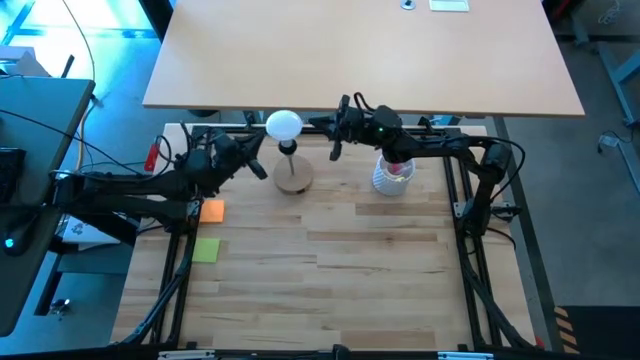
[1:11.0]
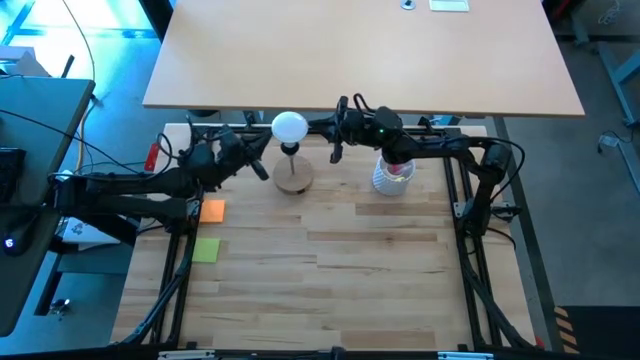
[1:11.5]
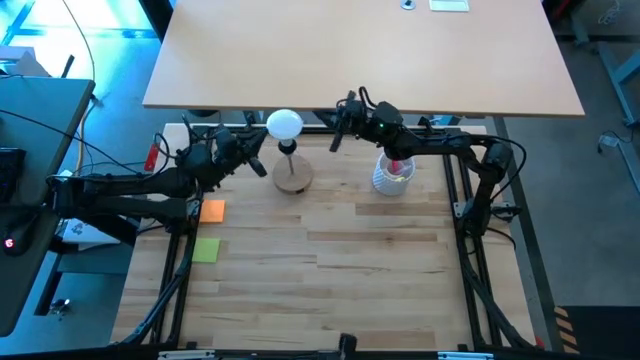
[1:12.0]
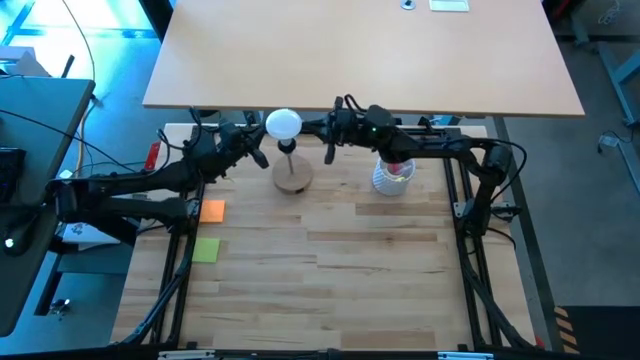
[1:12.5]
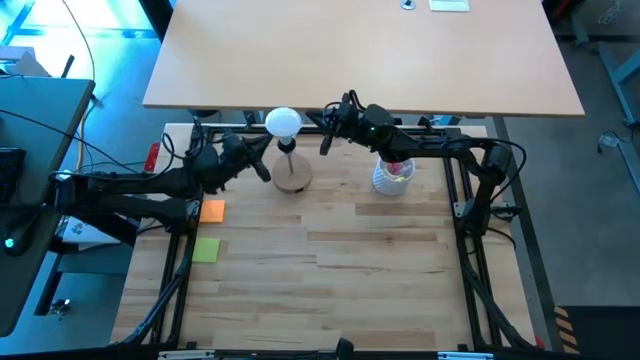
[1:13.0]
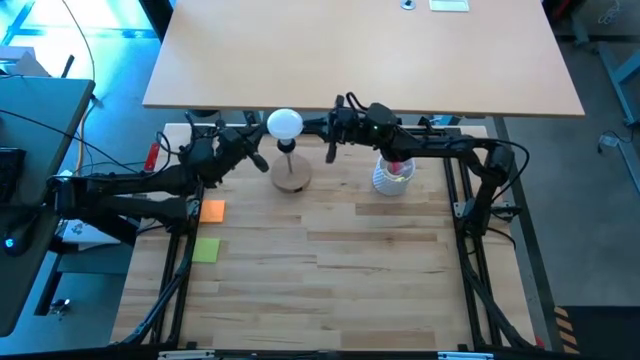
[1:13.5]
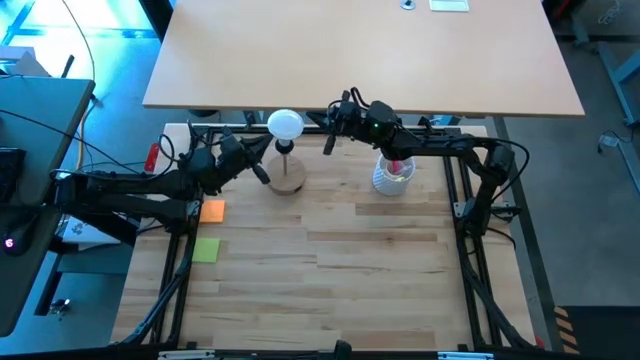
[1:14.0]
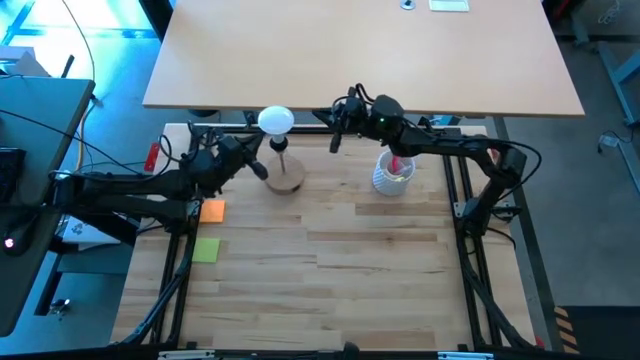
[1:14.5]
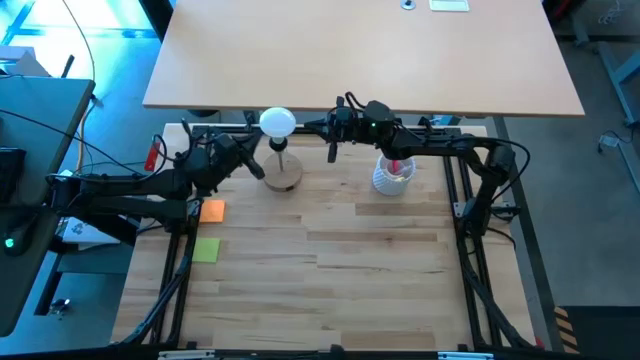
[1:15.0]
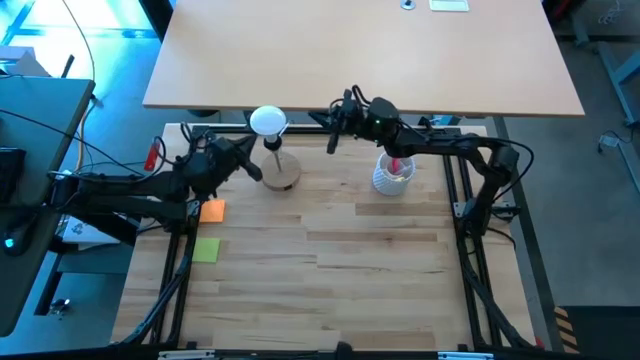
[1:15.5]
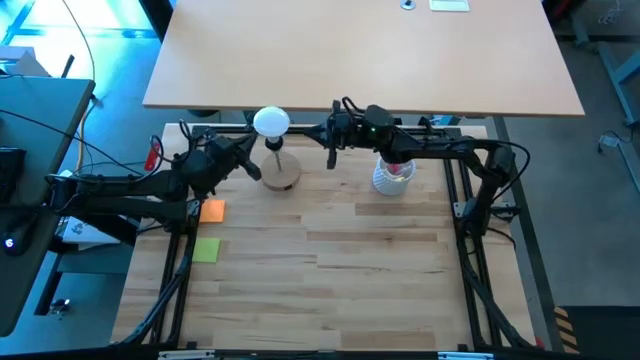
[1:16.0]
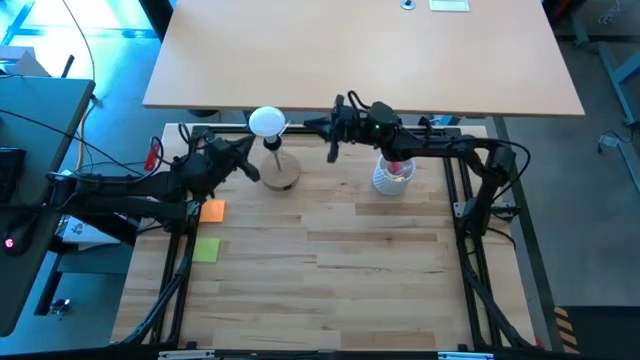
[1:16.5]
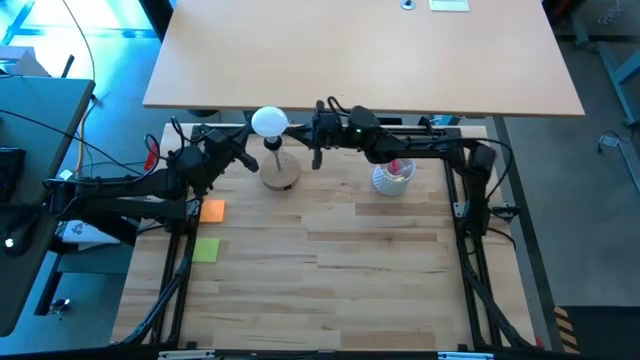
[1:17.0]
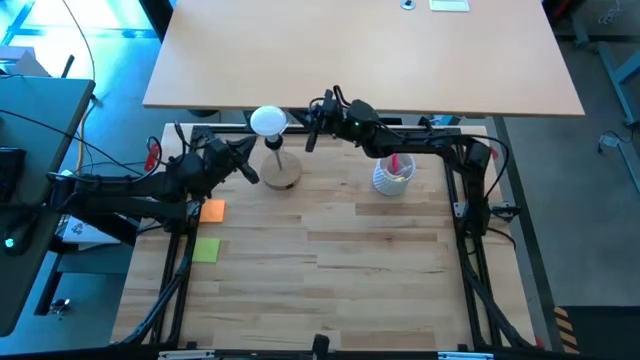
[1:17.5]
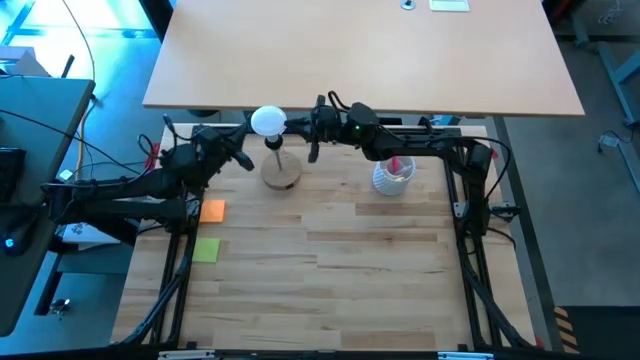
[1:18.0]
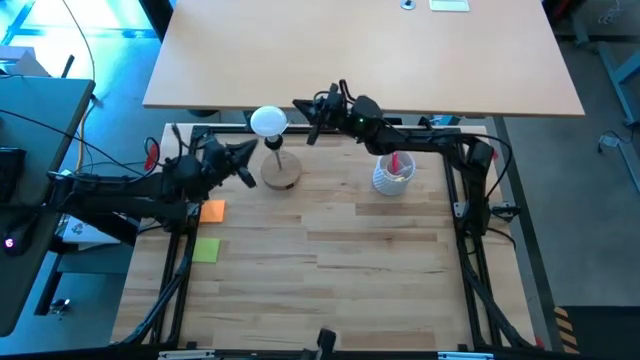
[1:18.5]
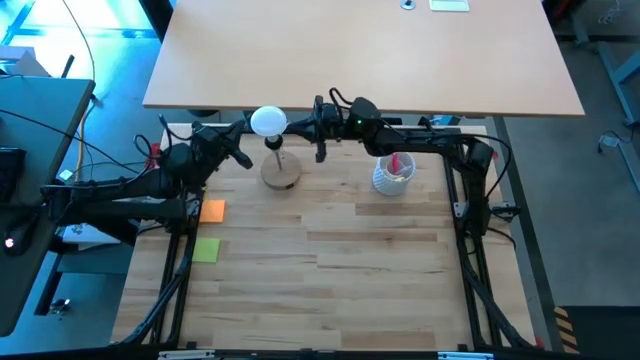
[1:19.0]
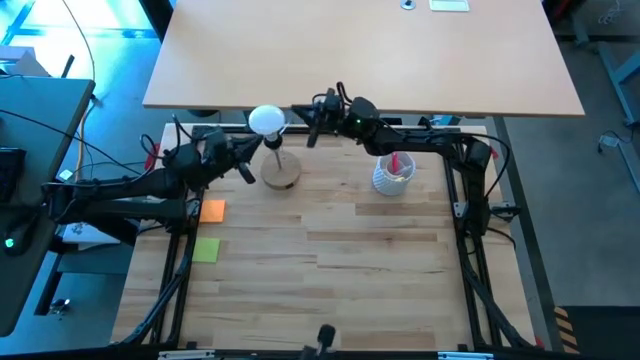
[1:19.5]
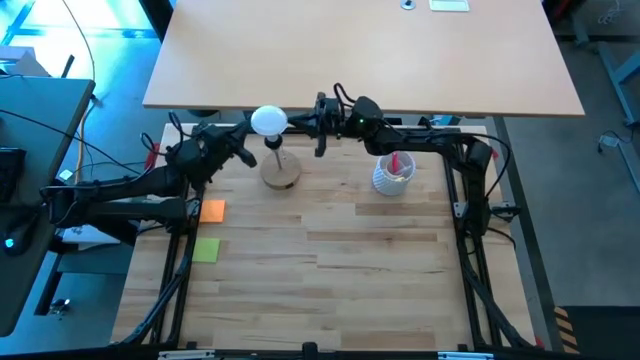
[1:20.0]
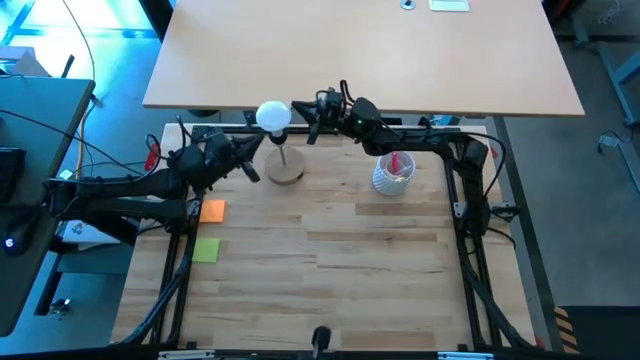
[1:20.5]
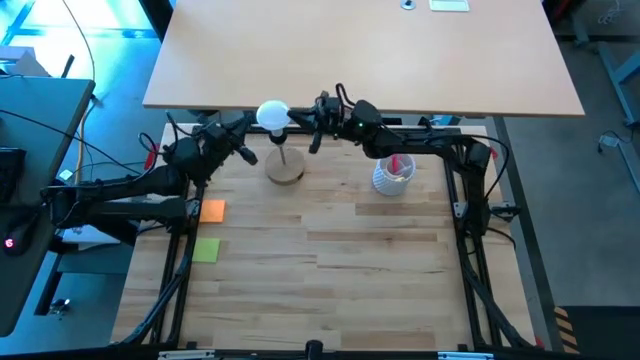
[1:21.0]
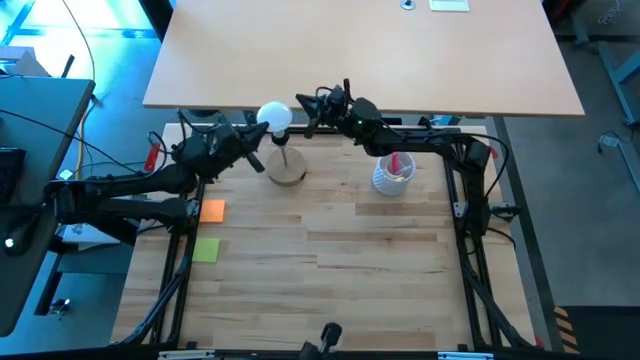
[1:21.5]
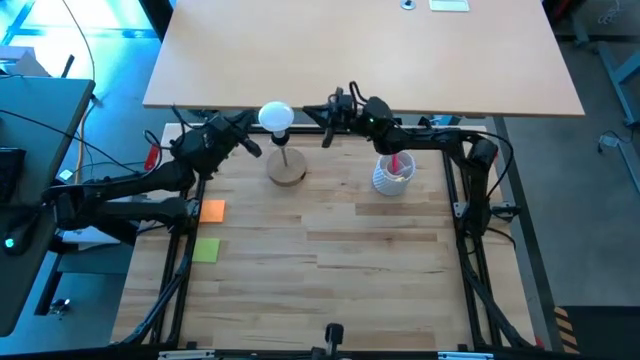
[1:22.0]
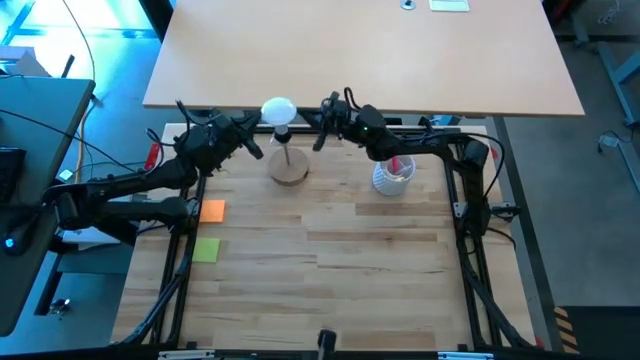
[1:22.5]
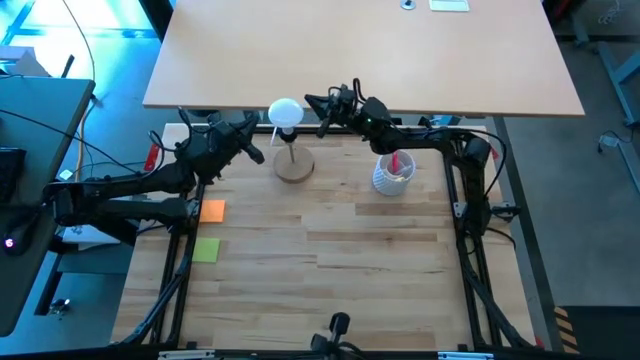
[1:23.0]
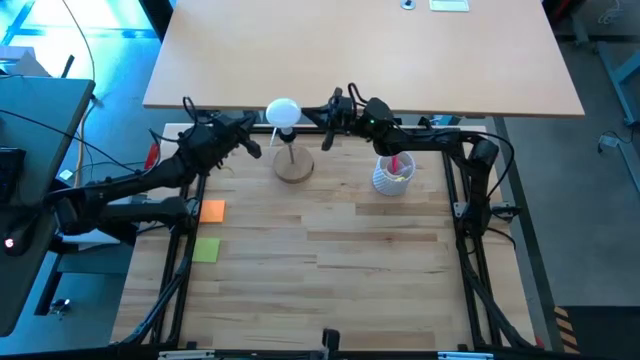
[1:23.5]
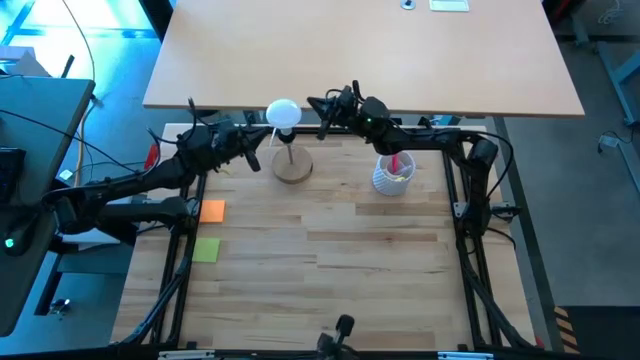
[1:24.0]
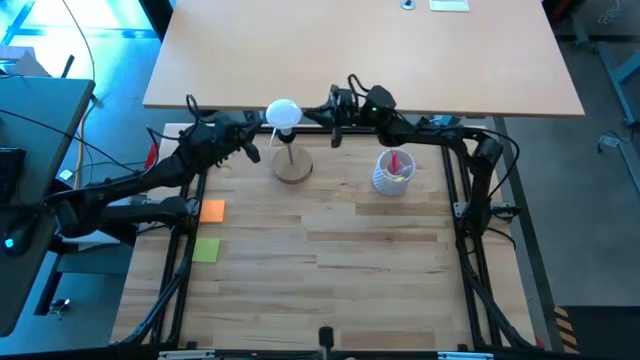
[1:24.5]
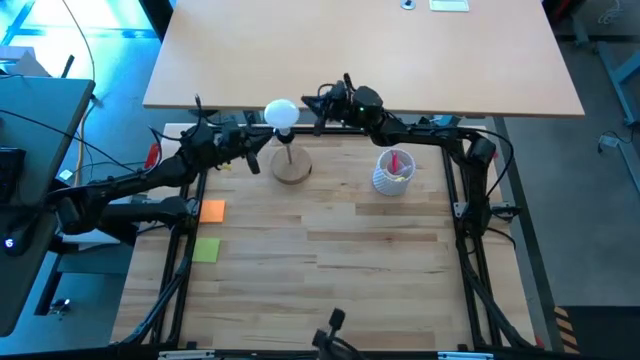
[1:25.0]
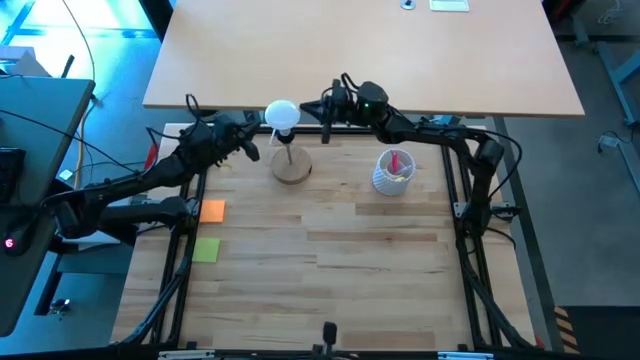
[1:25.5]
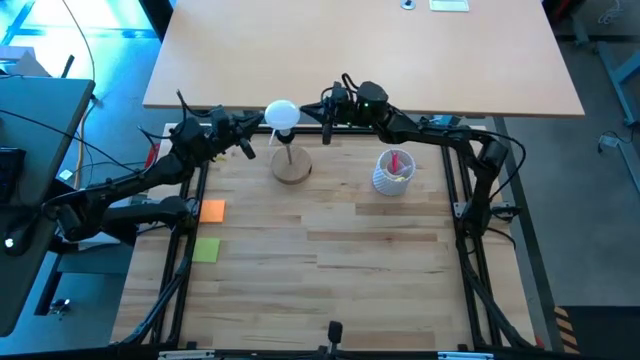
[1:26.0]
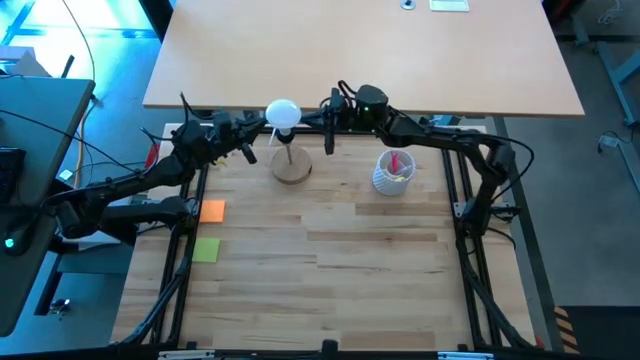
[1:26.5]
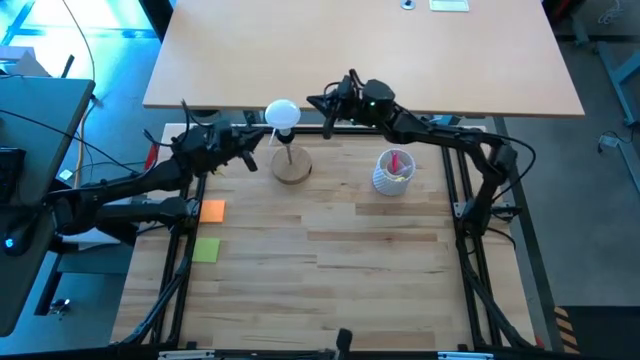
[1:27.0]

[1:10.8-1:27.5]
Task: Screw lightbulb
Remove the lightbulb from the lamp
